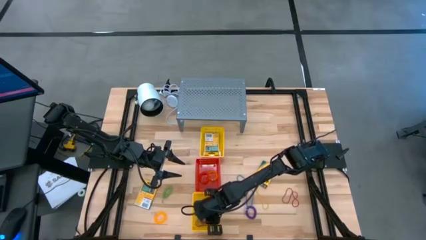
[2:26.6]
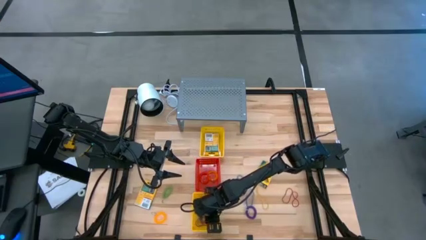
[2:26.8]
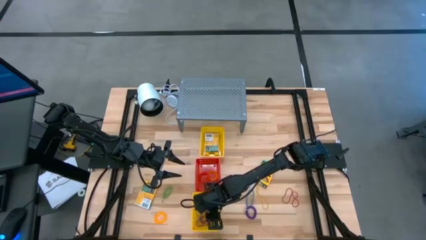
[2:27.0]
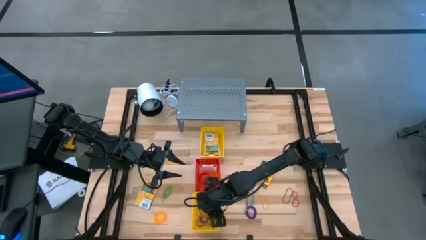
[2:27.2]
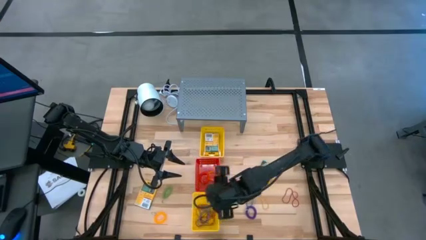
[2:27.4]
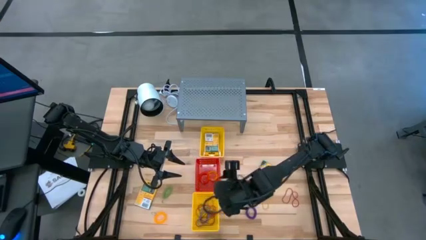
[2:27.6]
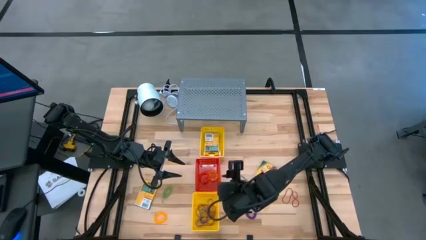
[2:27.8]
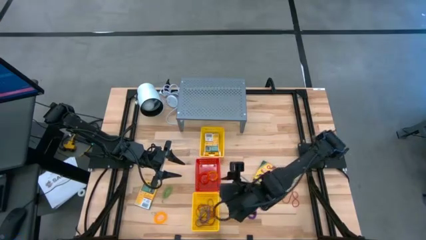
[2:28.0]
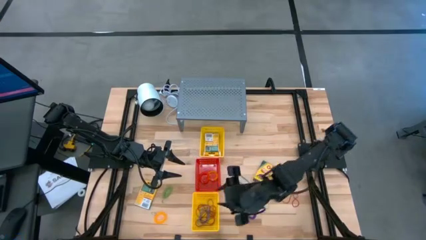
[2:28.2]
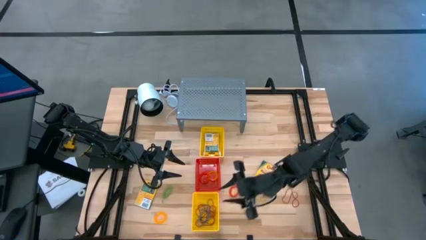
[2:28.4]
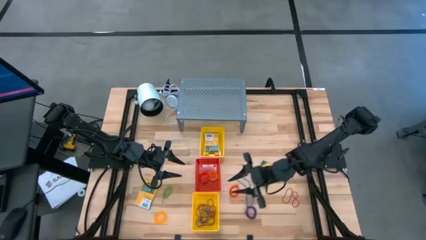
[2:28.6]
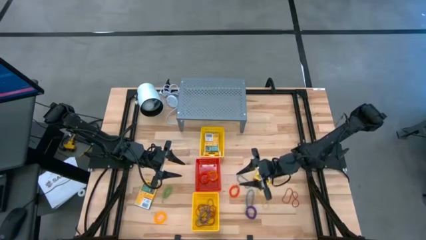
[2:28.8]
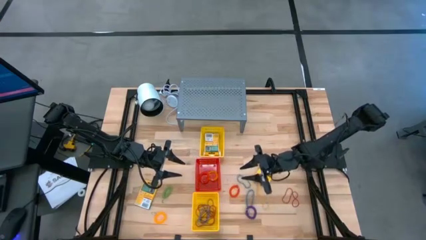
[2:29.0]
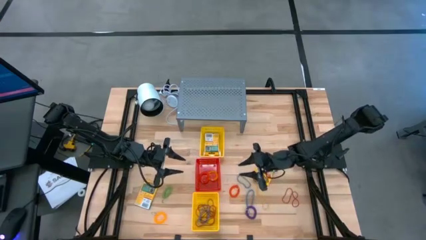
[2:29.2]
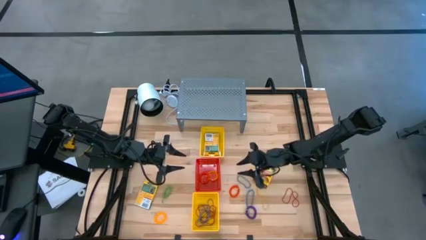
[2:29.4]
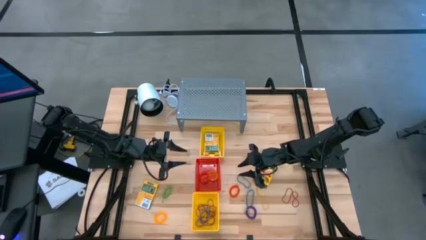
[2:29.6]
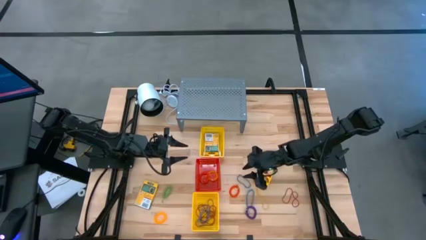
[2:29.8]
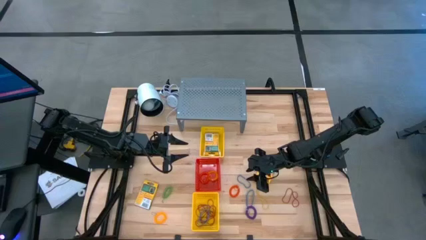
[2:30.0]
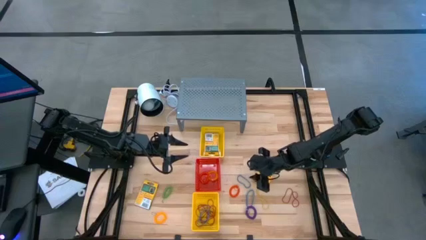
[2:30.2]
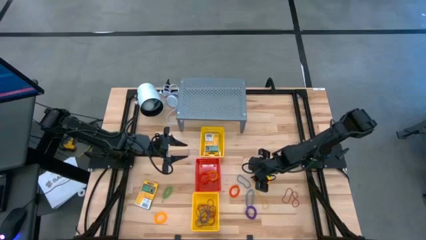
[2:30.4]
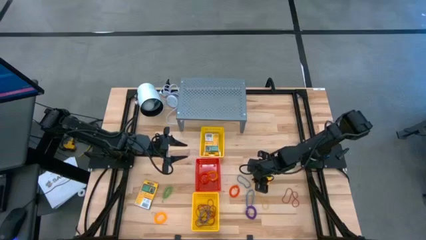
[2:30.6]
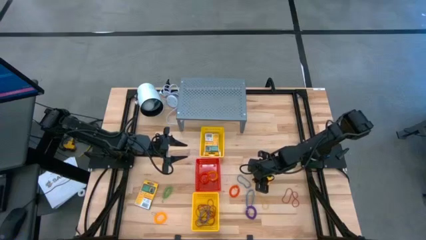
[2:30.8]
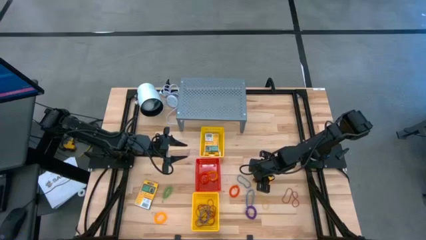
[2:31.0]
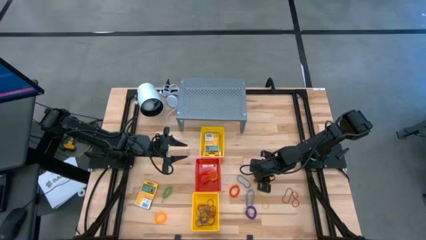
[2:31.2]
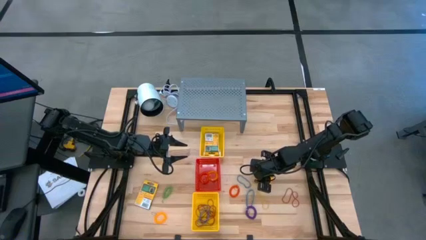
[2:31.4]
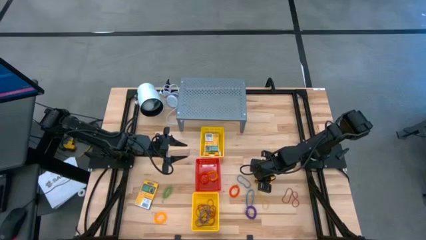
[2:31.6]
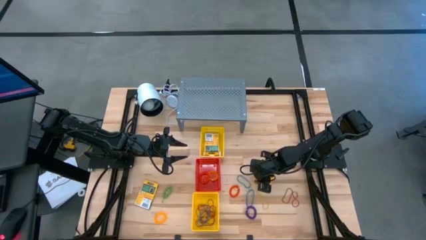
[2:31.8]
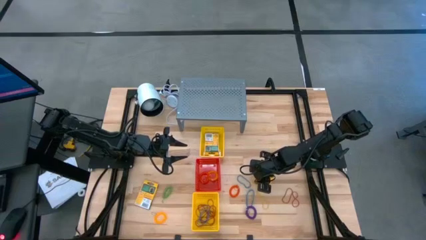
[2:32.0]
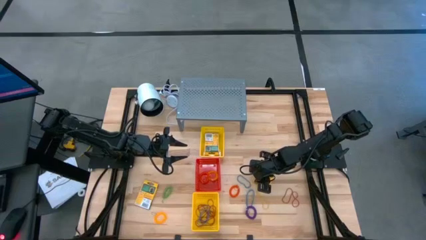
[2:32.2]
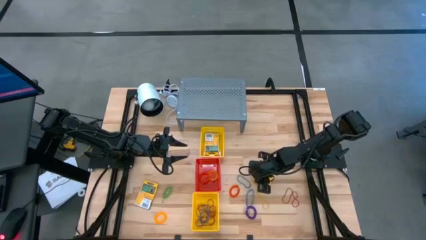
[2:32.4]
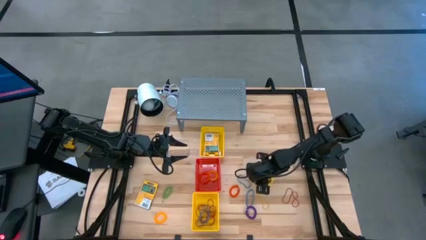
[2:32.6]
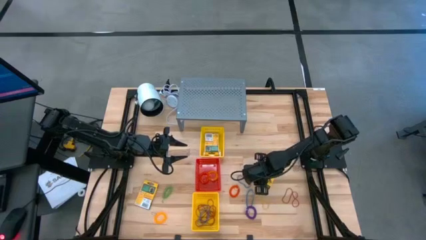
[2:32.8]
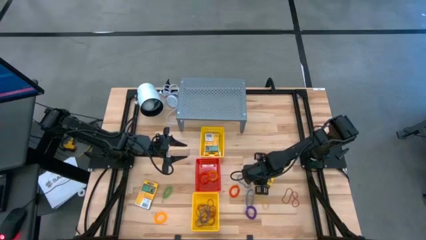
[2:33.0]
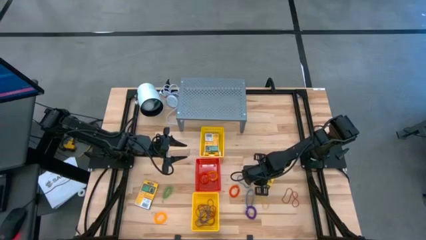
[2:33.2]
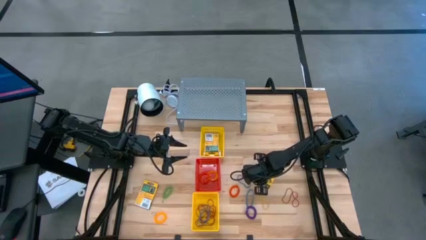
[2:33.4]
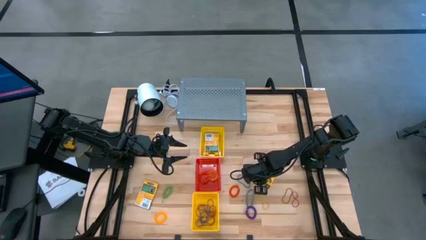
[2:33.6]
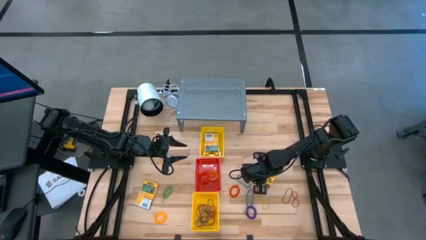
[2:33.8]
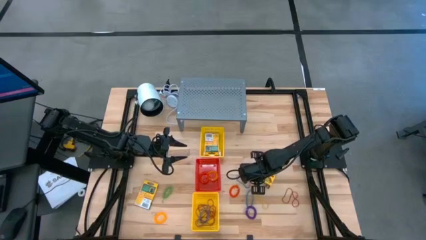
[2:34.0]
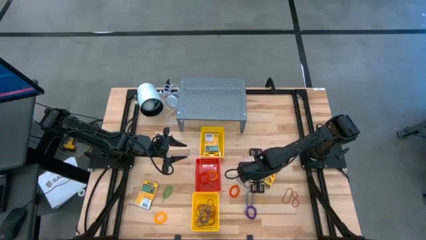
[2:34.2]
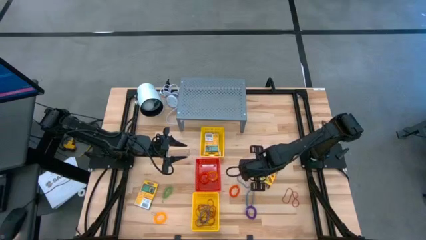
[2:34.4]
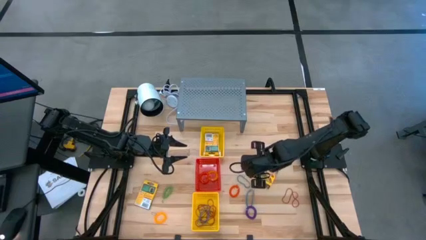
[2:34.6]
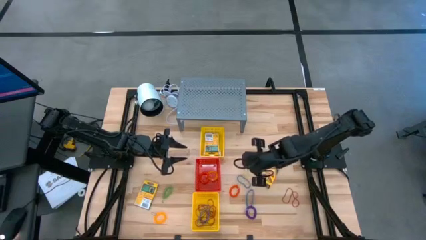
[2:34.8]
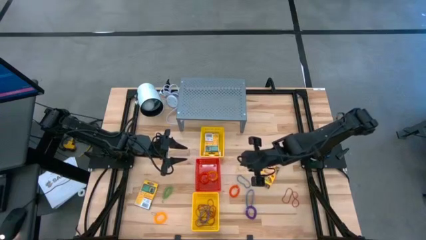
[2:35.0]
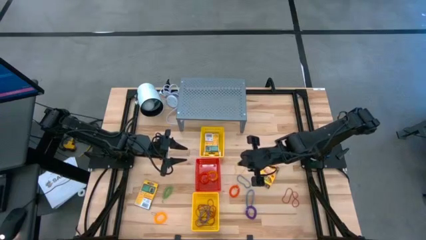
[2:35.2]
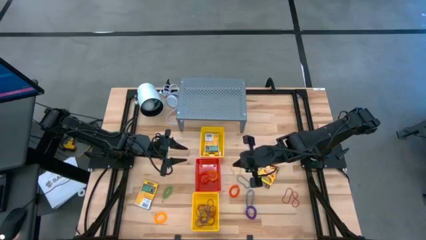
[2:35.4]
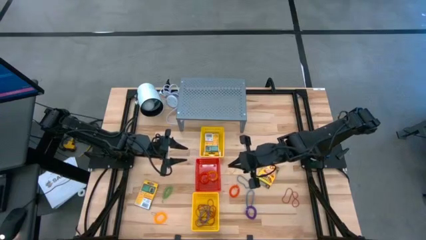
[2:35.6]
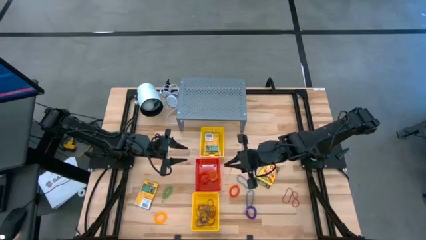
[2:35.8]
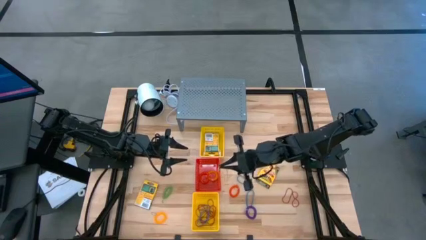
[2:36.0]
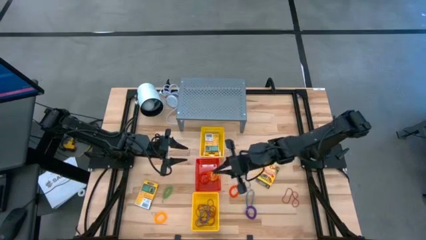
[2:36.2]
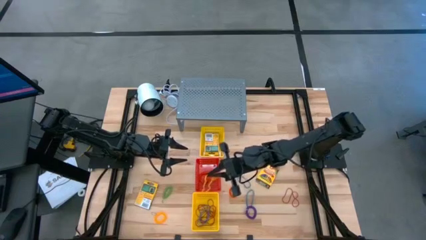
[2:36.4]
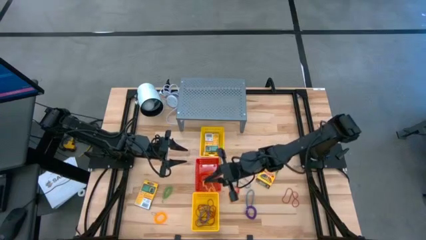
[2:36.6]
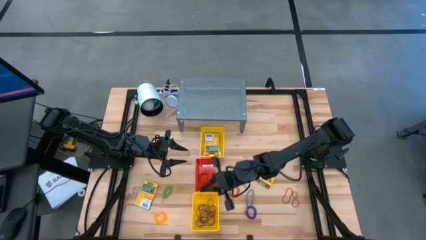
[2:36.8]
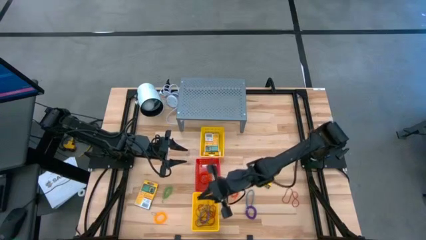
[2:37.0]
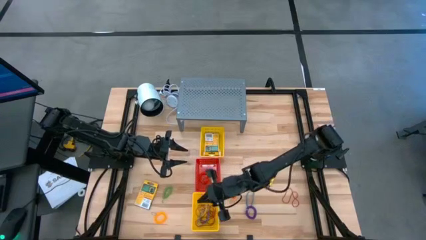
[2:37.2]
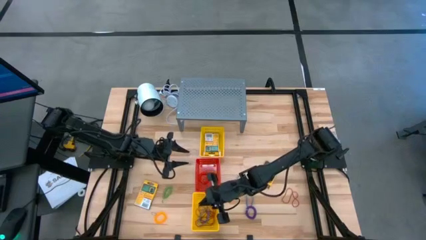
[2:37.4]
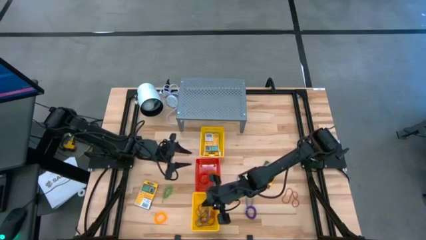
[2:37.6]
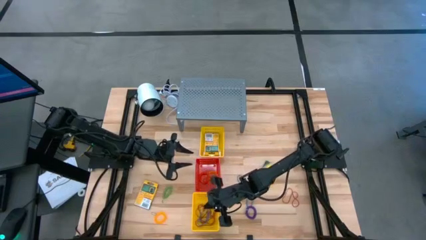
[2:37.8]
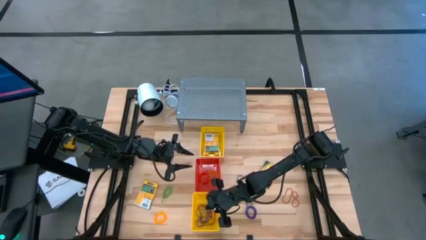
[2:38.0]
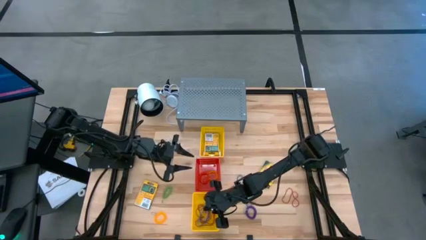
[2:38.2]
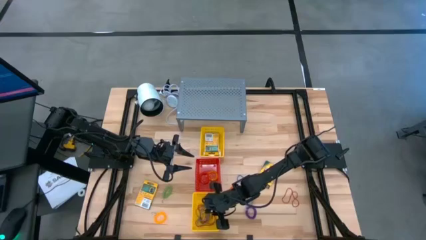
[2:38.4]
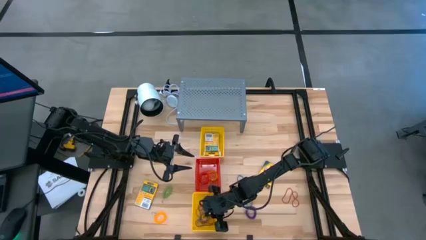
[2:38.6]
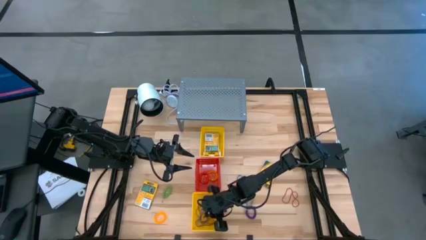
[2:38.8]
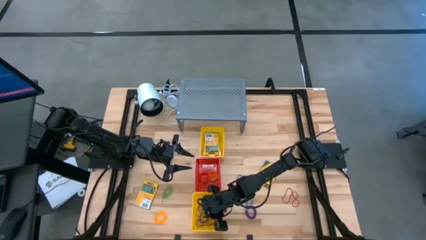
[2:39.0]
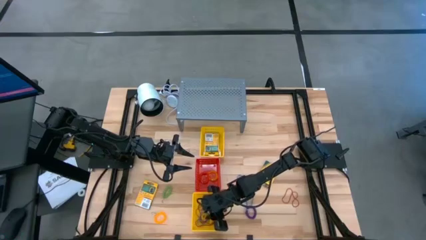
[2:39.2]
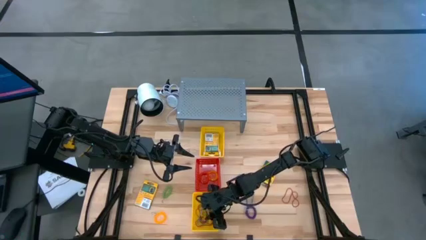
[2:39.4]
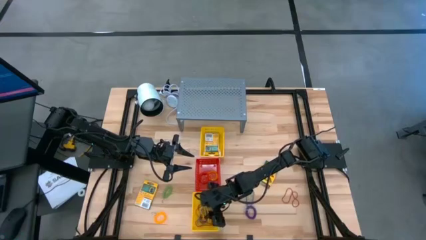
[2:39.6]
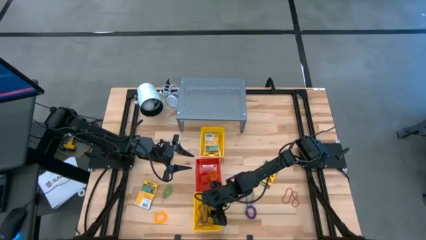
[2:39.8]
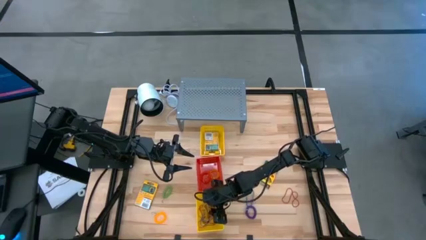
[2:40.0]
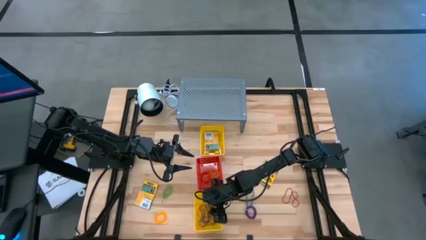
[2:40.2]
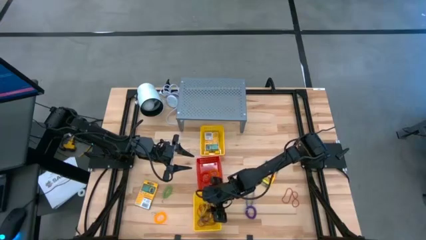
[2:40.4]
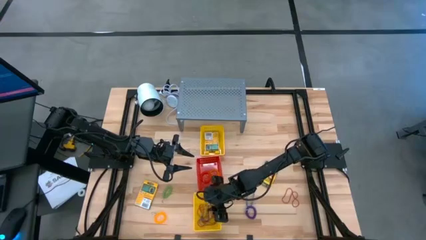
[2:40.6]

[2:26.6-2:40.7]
Task: Pick & Place Office Desk Supplies
Put the yellow rubber band into the bottom yellow bin

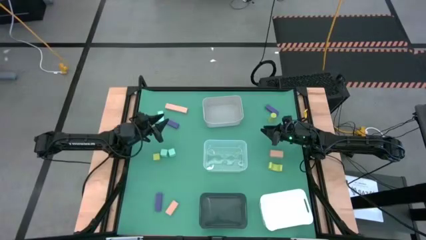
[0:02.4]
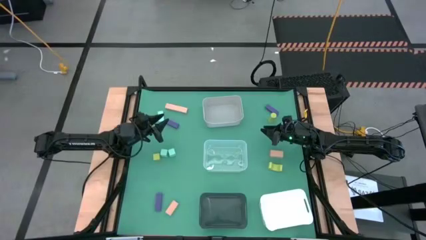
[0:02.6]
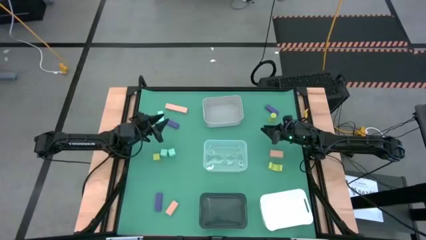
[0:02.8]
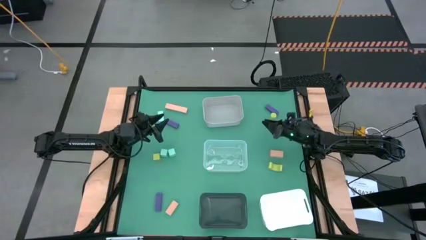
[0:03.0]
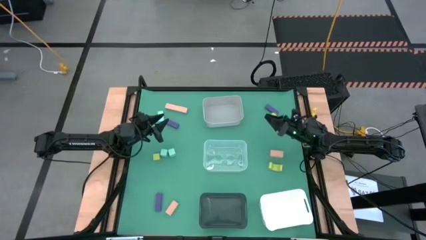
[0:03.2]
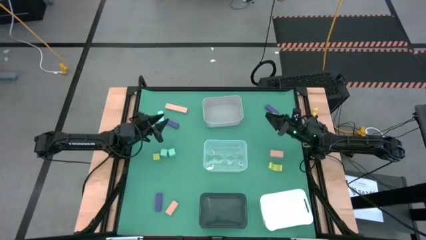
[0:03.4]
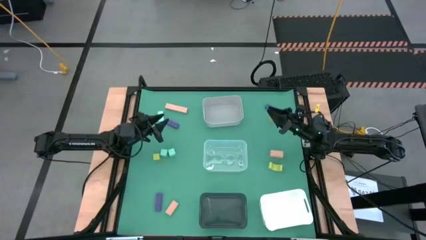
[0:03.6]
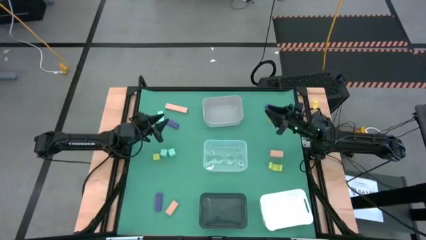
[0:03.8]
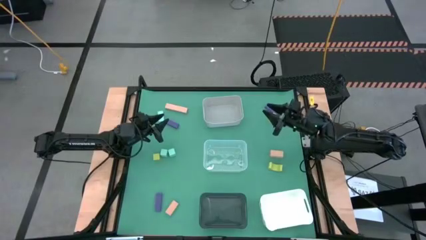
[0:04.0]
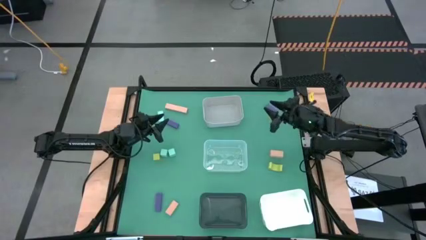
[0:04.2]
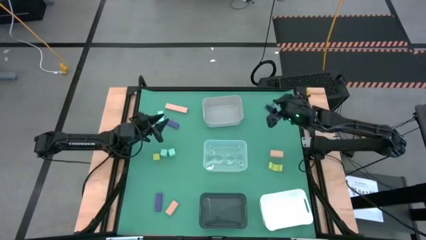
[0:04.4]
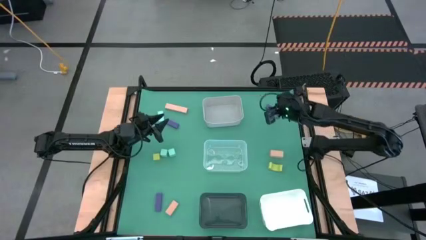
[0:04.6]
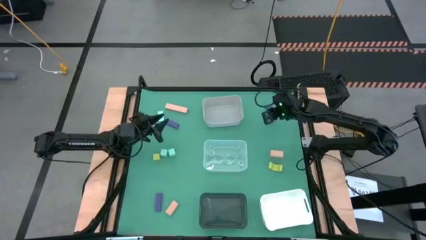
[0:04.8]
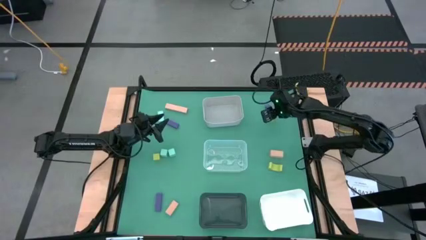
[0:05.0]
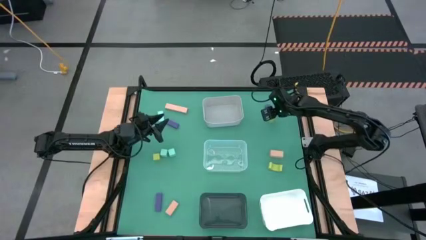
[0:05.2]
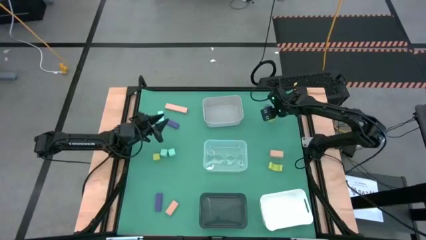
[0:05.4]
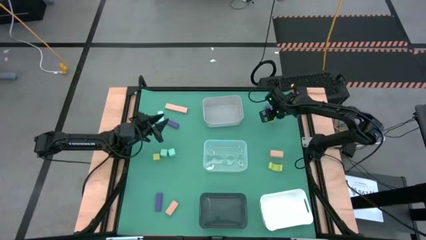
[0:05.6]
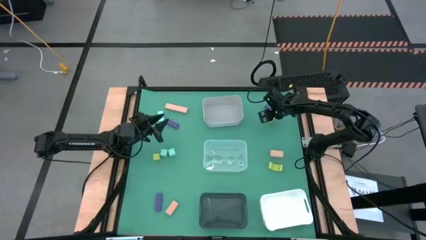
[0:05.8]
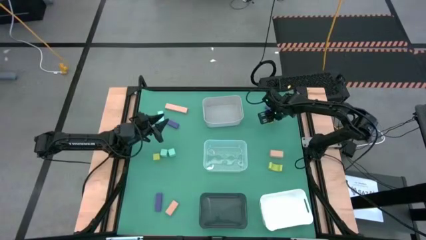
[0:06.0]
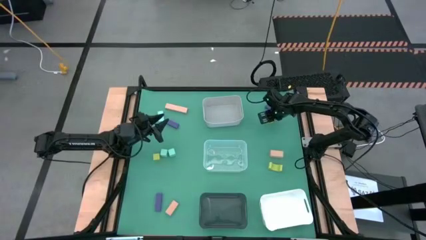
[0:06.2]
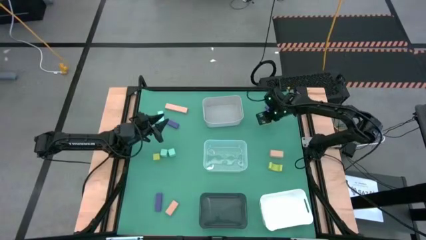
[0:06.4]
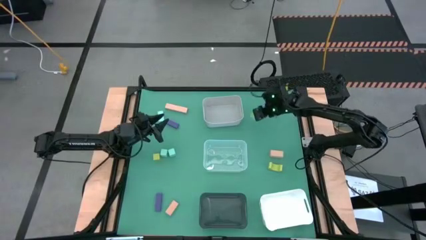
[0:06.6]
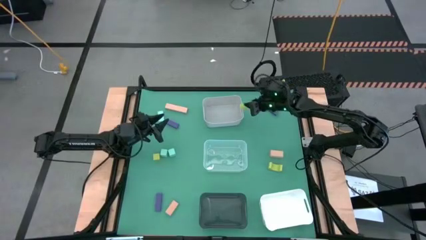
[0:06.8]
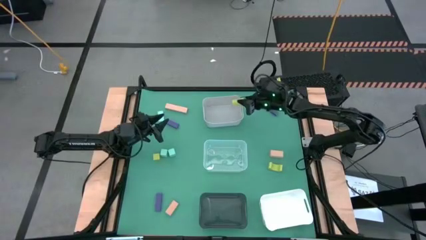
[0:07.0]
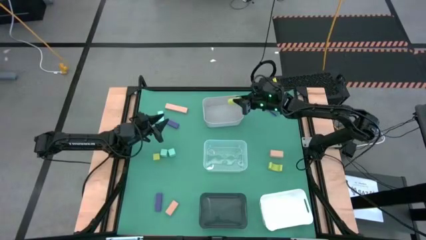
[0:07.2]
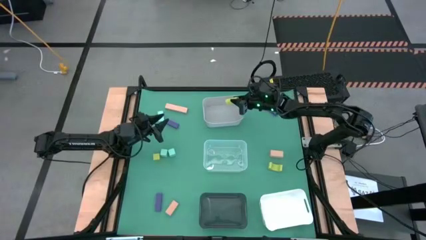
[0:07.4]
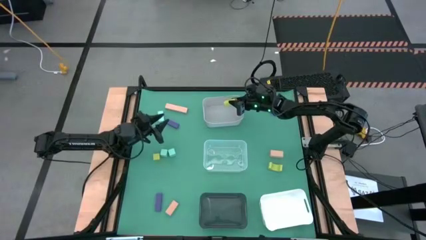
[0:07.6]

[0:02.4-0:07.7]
Task: Sort & place blocks by color
Put the top green block into the gray bin
